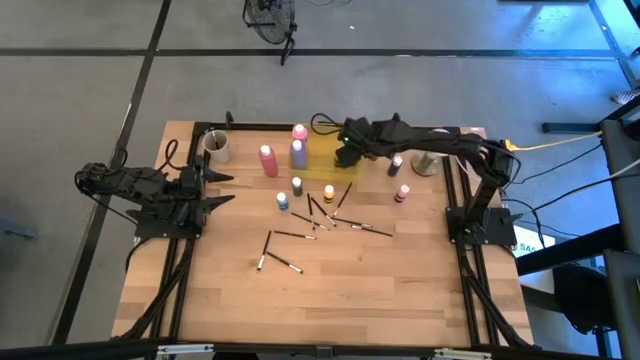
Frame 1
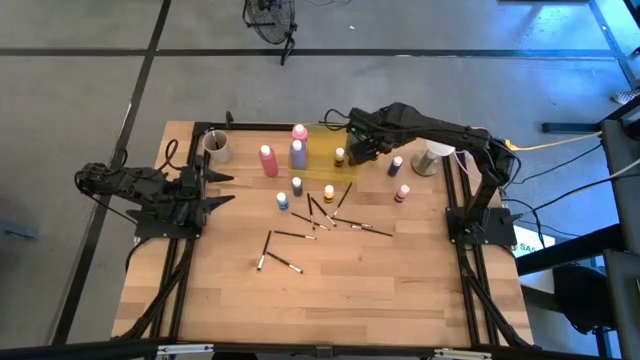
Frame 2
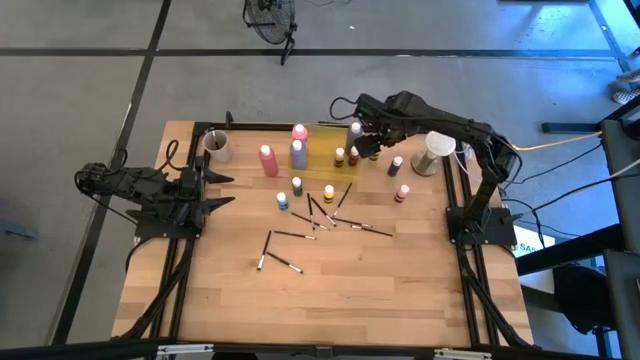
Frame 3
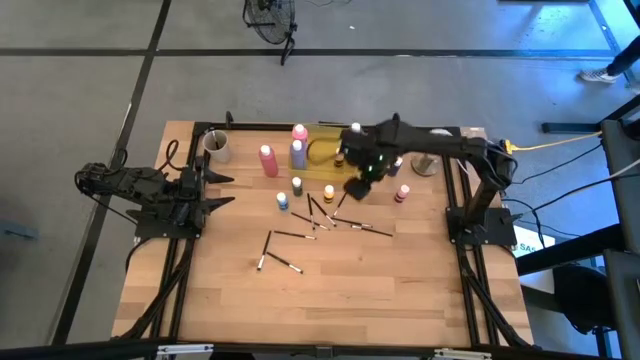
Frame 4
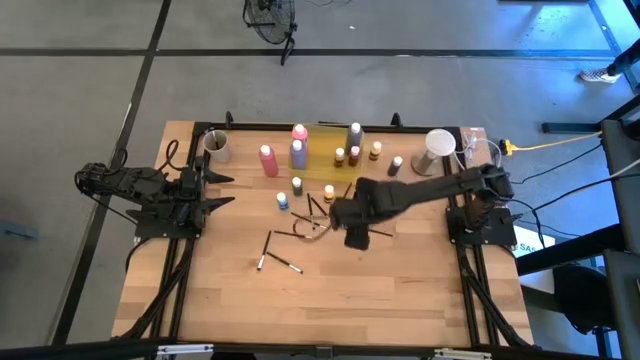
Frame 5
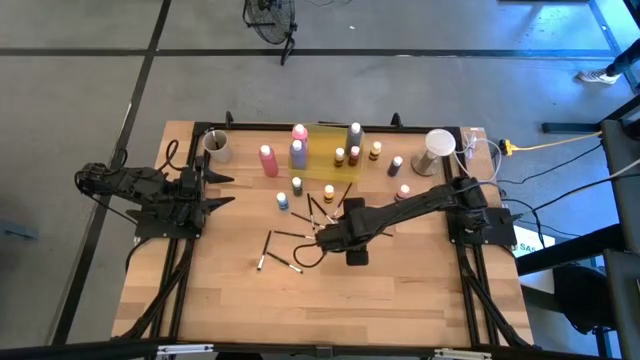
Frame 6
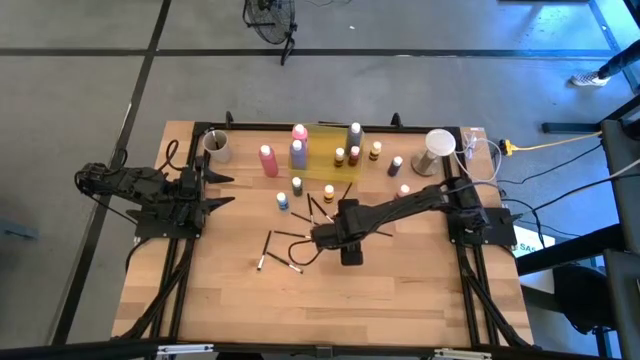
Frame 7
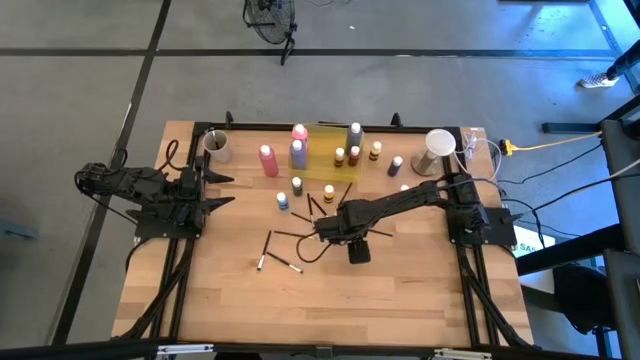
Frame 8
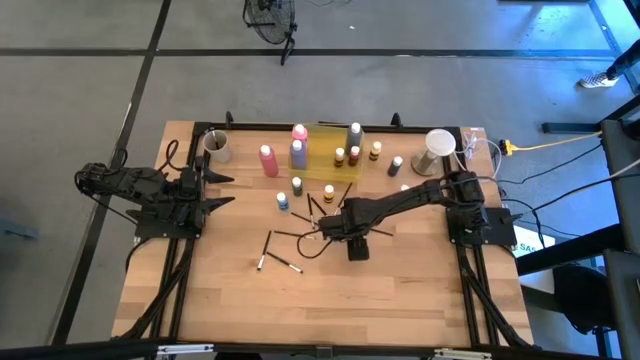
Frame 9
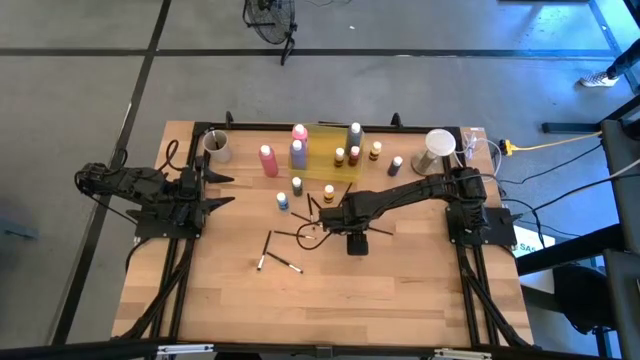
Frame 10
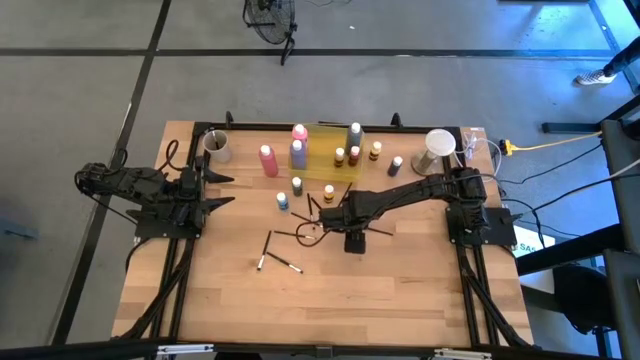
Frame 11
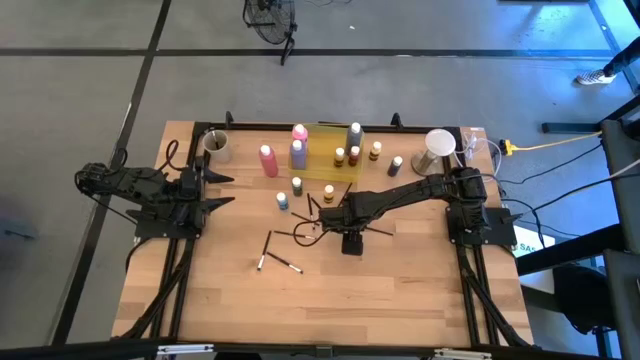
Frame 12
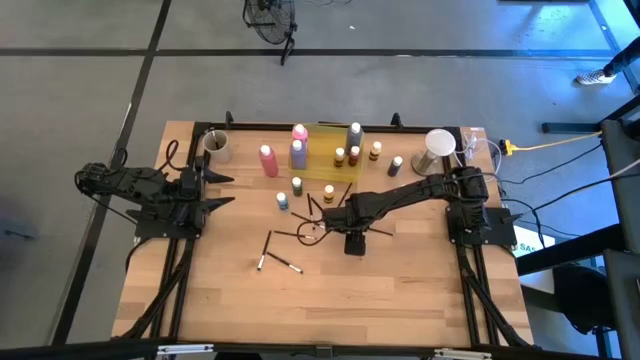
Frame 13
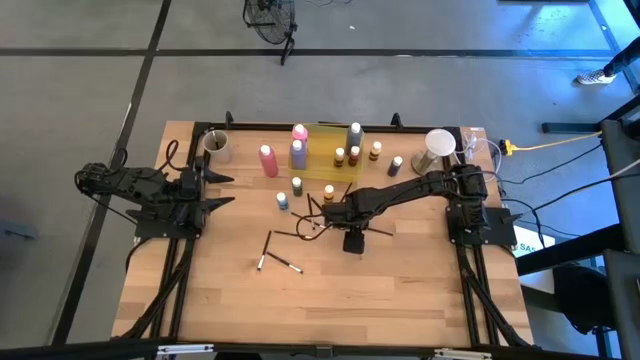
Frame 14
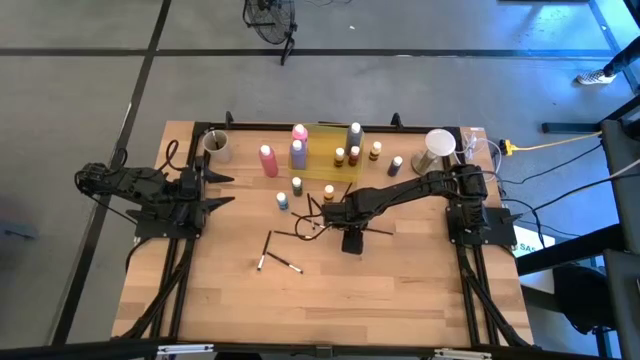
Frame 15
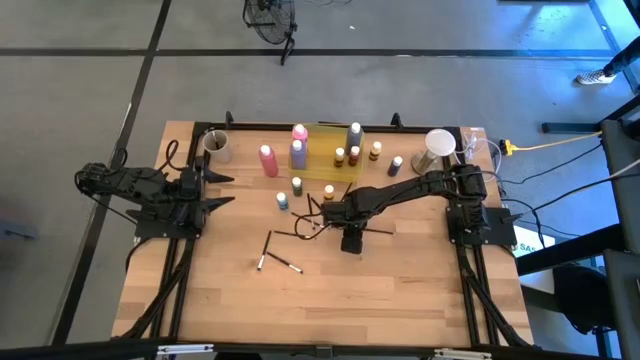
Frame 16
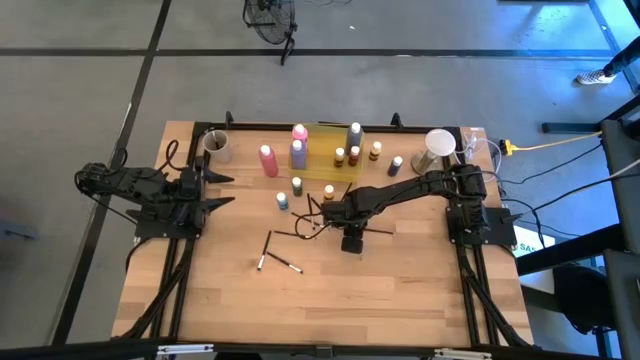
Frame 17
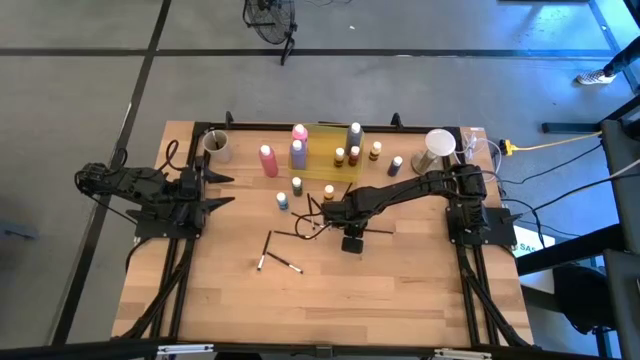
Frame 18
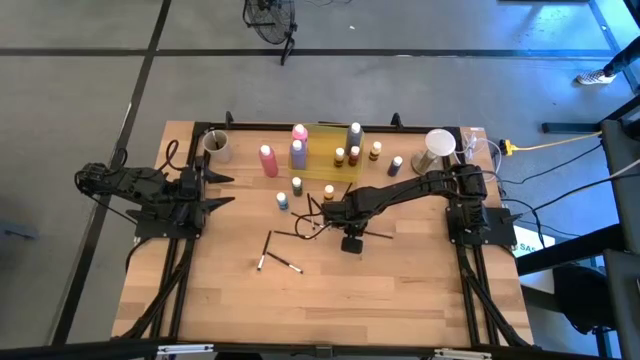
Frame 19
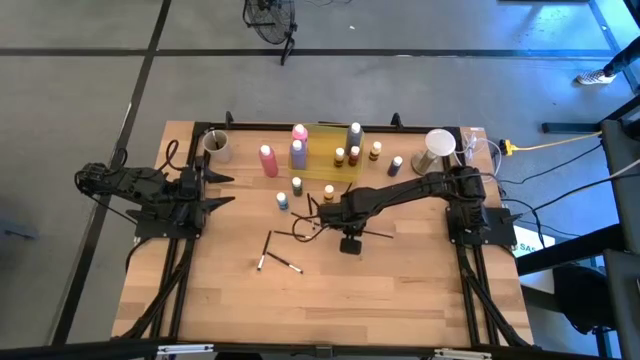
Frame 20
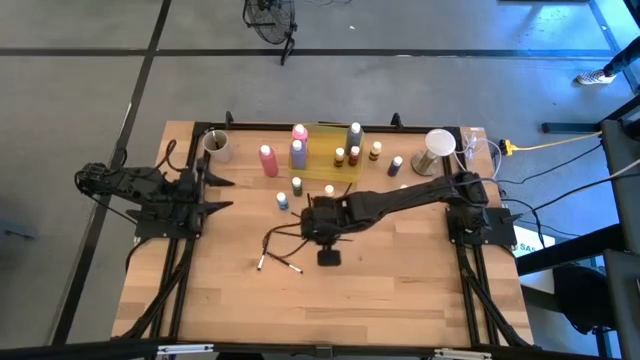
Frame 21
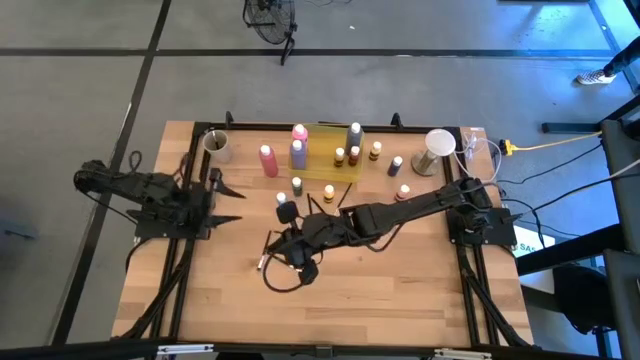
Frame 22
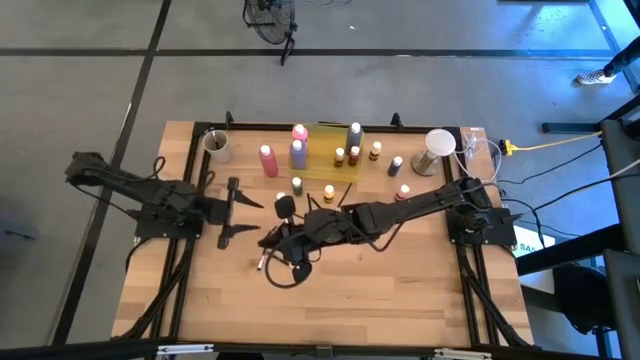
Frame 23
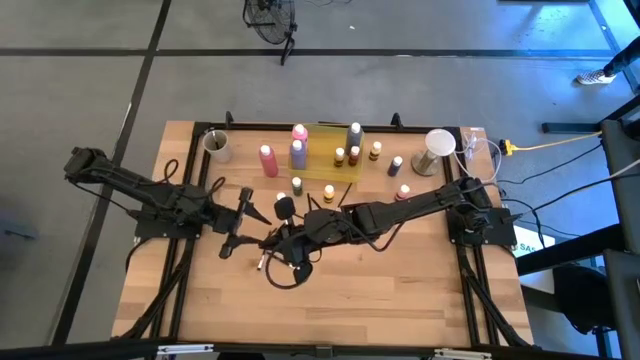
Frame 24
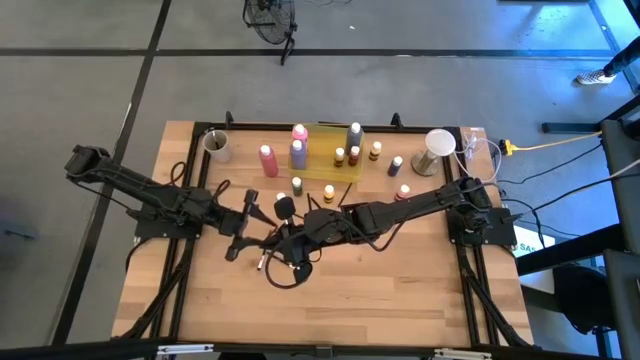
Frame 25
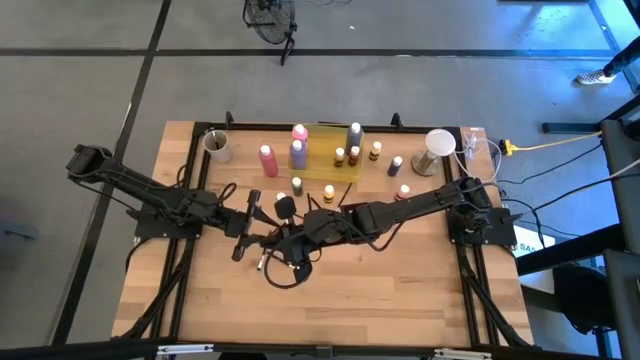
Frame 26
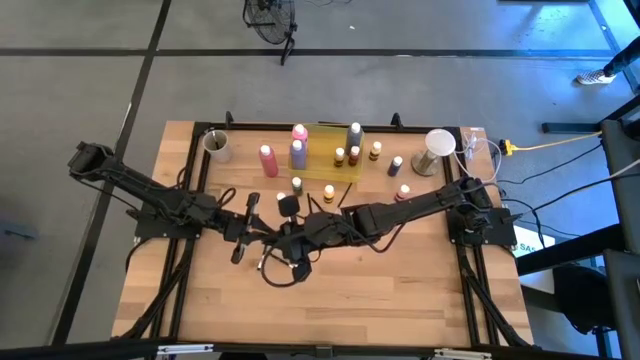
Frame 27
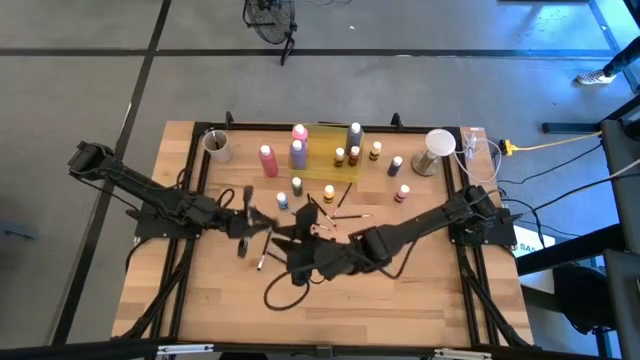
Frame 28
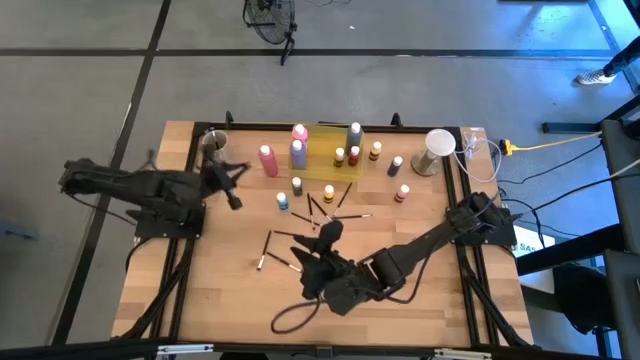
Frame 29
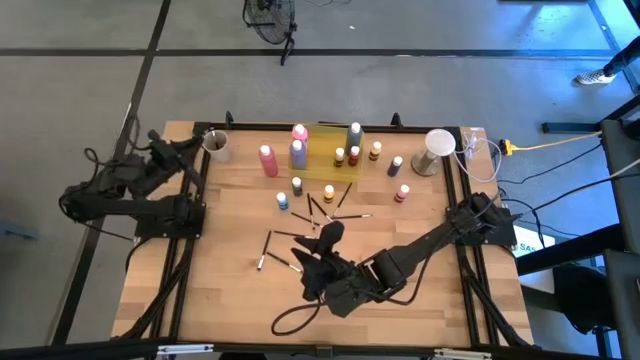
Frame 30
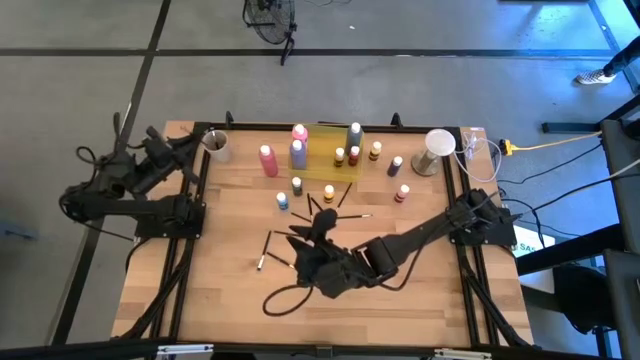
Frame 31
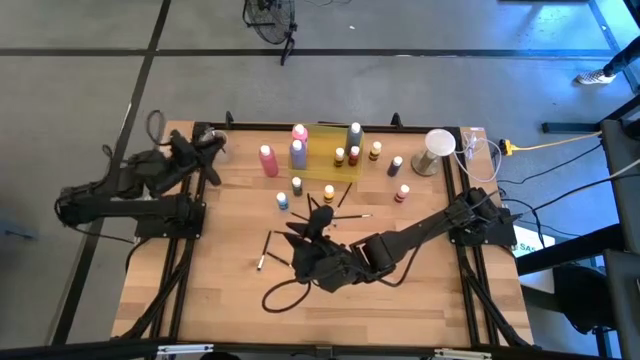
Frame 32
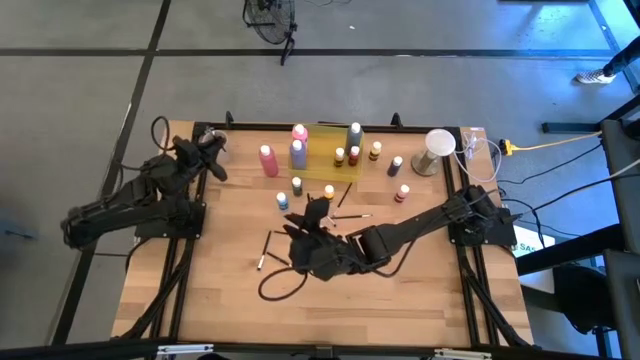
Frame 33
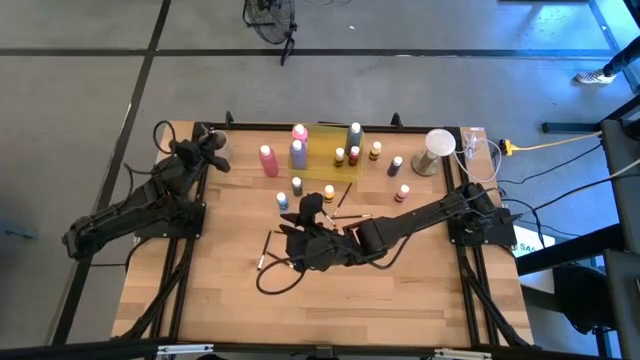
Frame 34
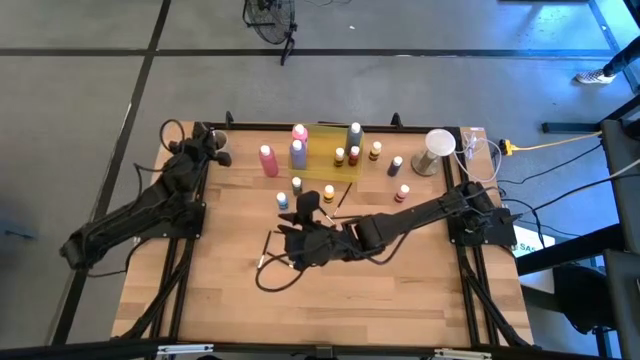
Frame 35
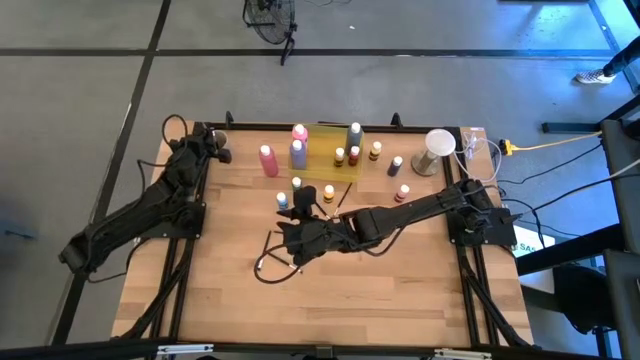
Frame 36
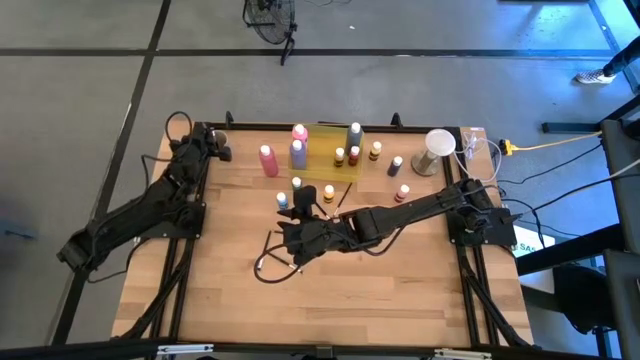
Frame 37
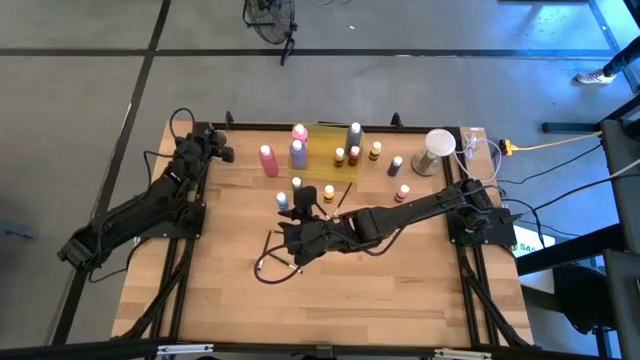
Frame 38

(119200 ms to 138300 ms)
Task: Pick & Place Paint Supplies
Put the silver paintbrush into the white cup

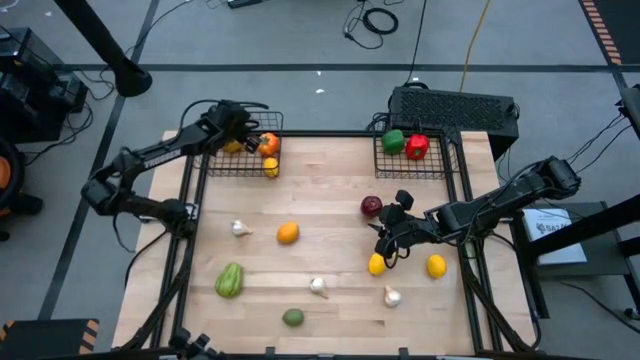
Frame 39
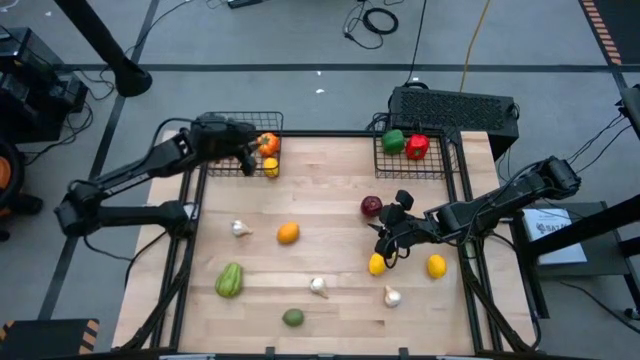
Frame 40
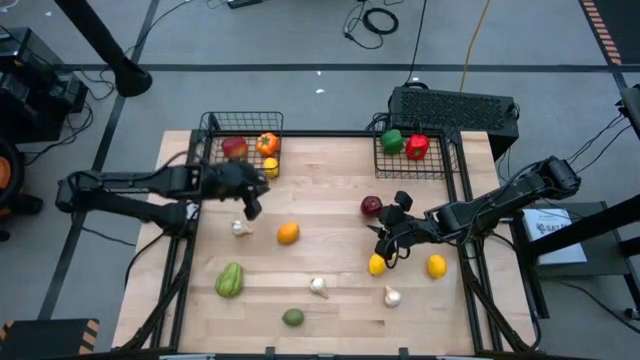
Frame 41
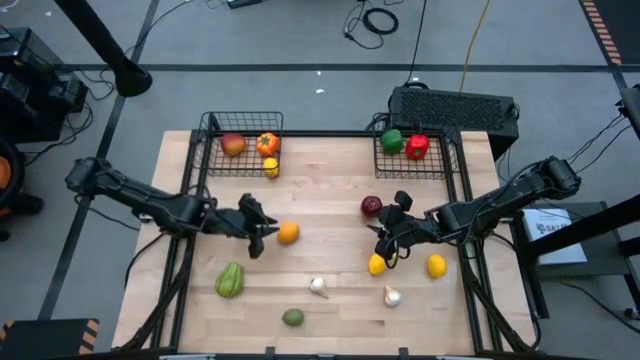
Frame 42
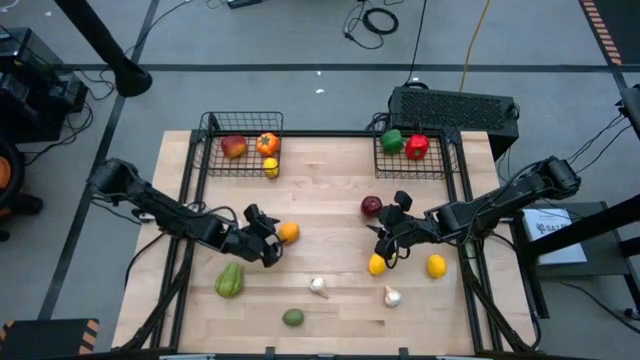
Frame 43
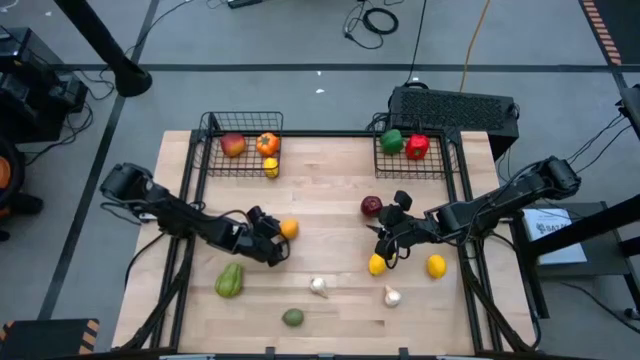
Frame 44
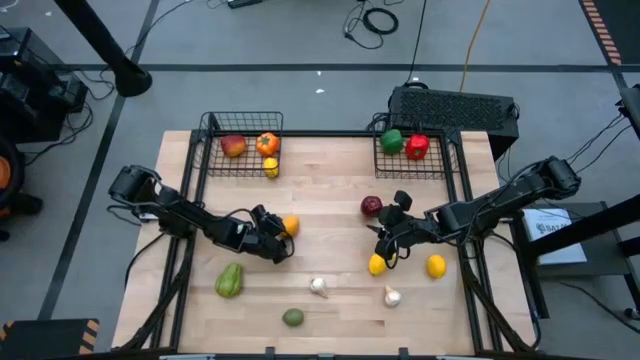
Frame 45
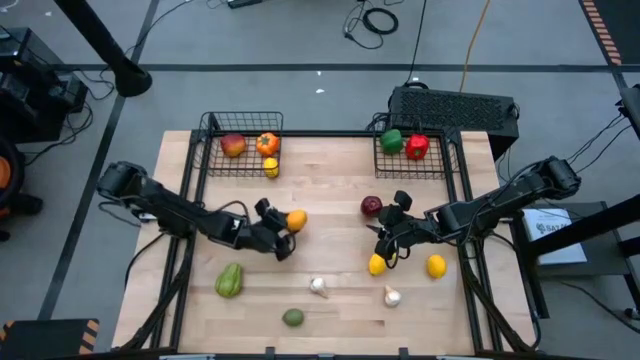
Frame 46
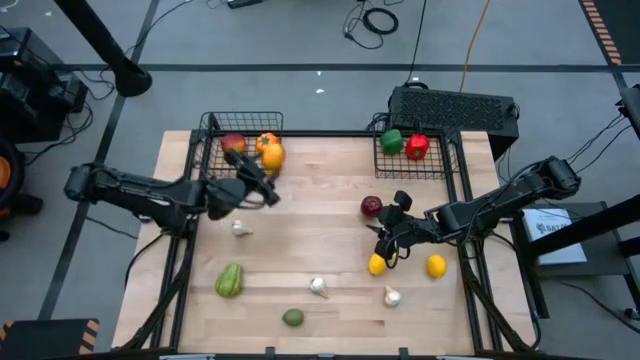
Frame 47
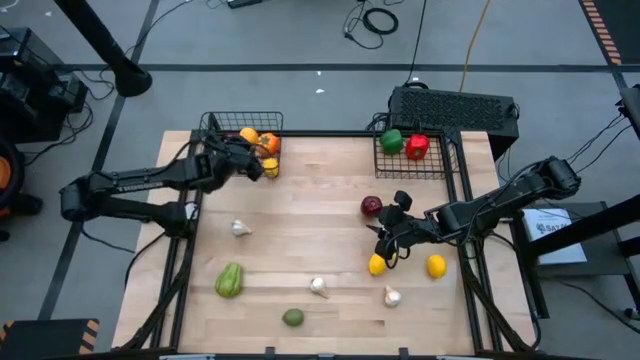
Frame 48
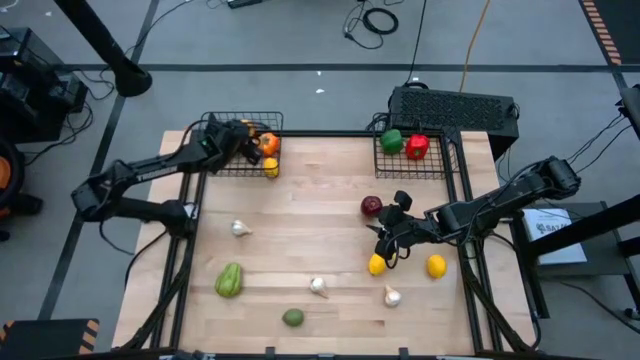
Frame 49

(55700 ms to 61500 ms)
Task: Sort produce into baskets
Put the left yellow lemon in the left basket
